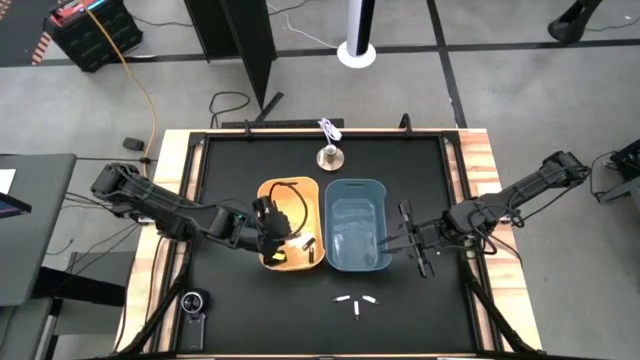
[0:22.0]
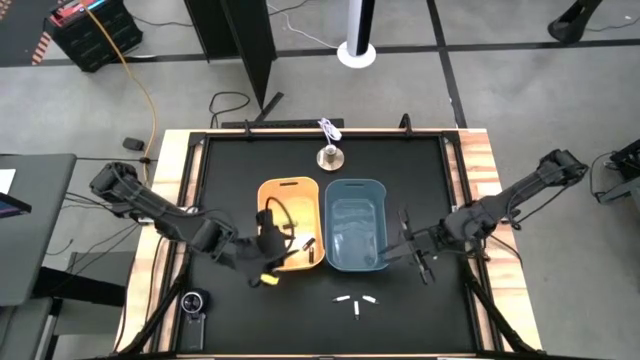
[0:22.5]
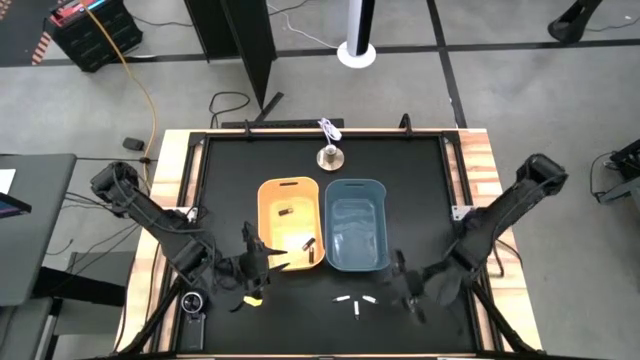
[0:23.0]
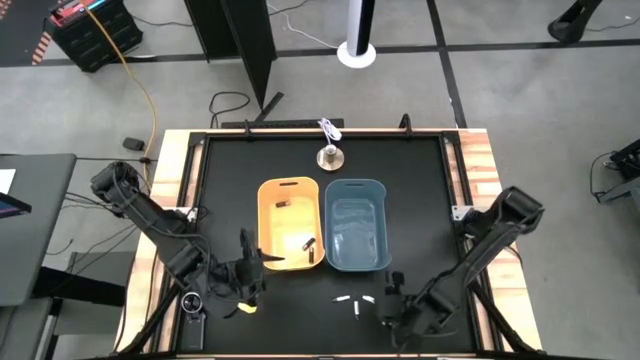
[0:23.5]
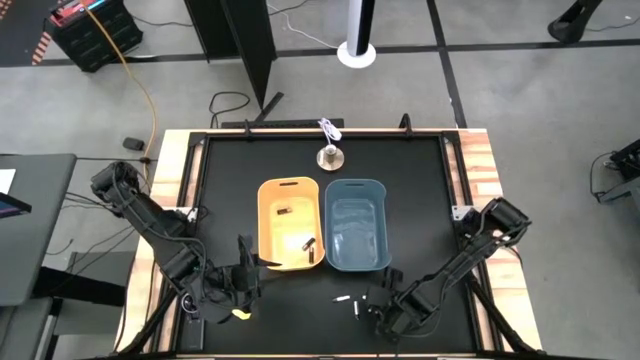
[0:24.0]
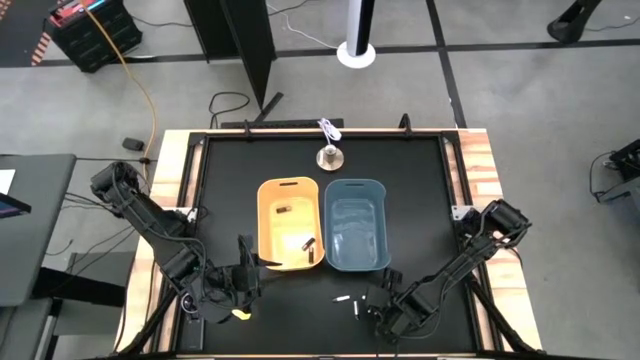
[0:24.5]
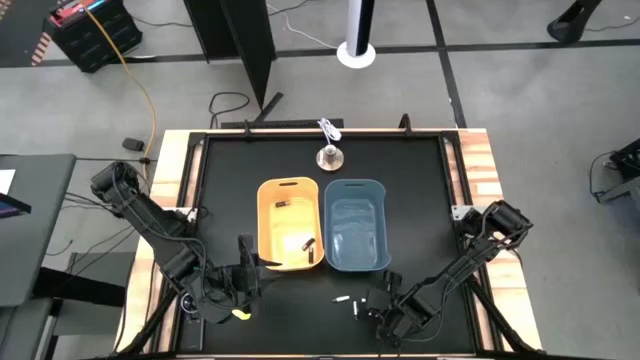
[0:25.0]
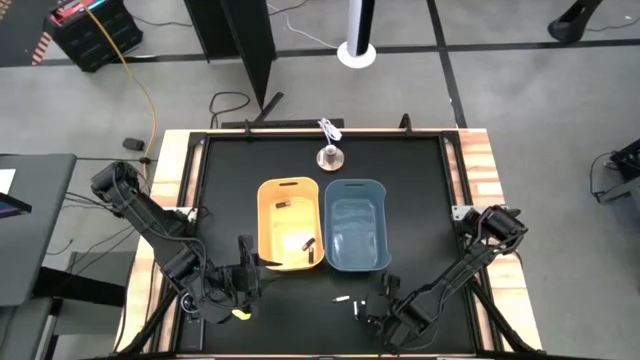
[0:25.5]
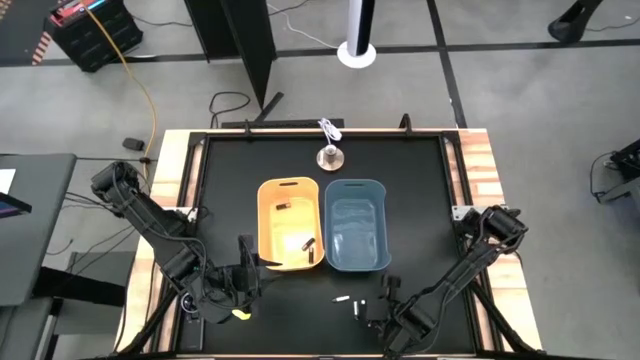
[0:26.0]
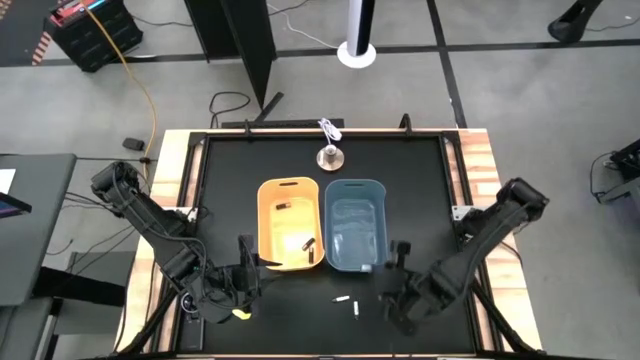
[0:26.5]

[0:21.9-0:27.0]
Task: Sort batteries
Put the right silver battery into the blue bin

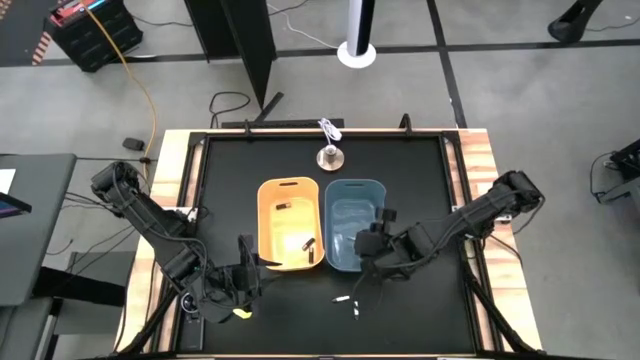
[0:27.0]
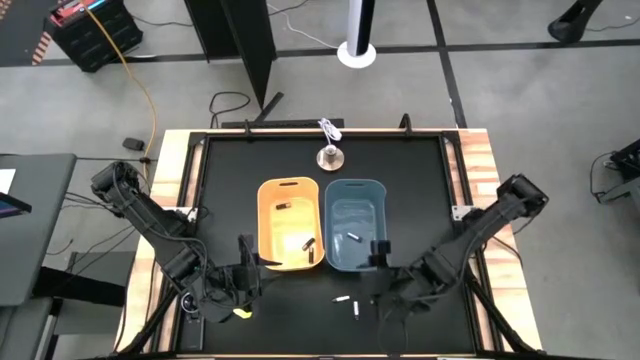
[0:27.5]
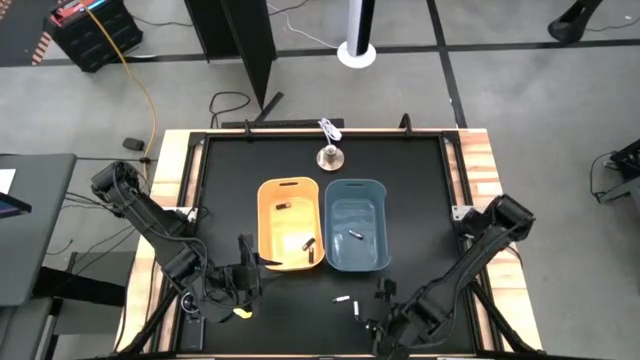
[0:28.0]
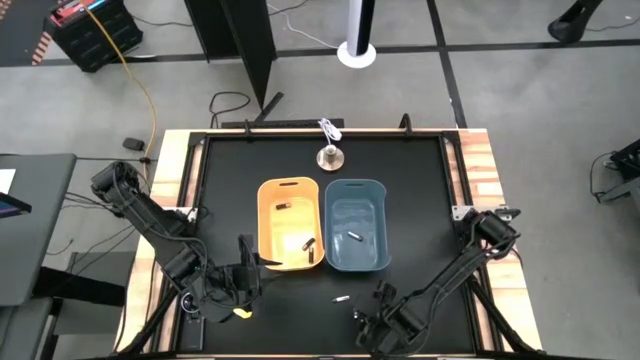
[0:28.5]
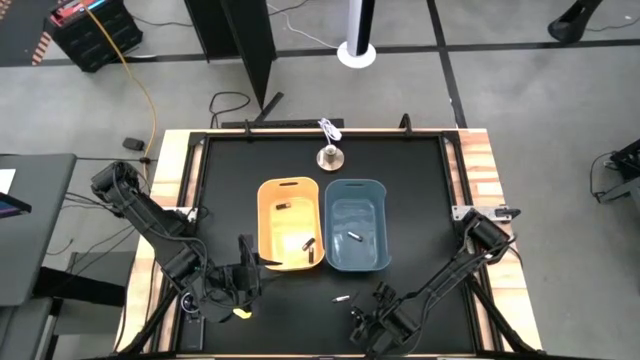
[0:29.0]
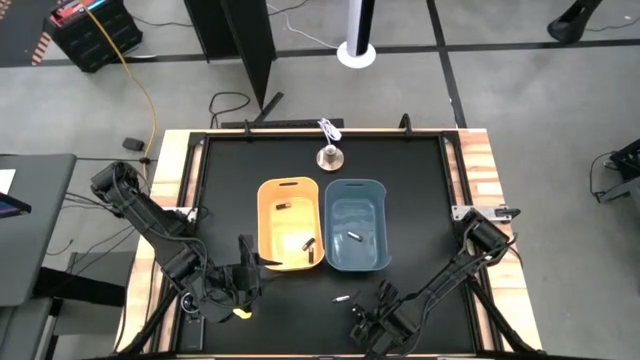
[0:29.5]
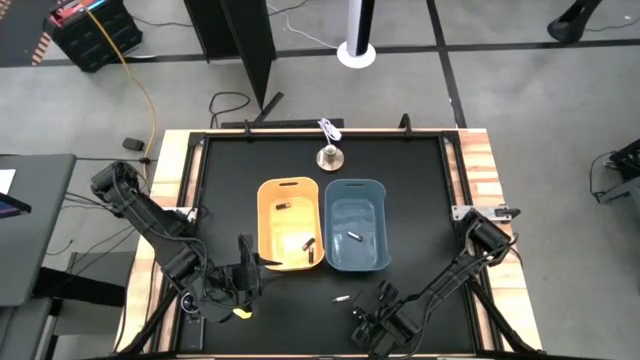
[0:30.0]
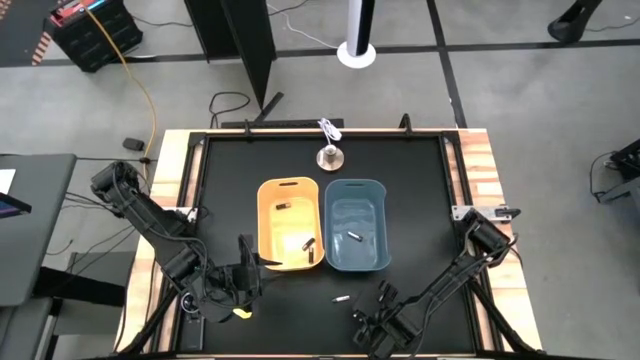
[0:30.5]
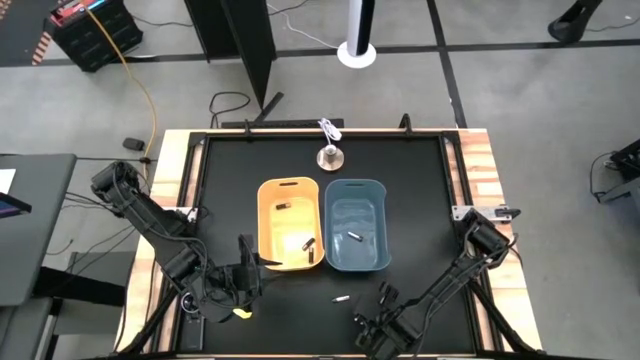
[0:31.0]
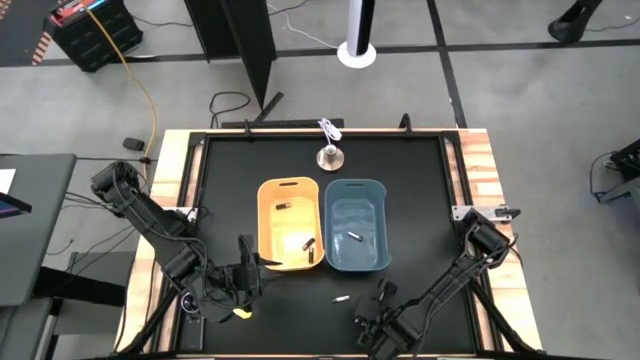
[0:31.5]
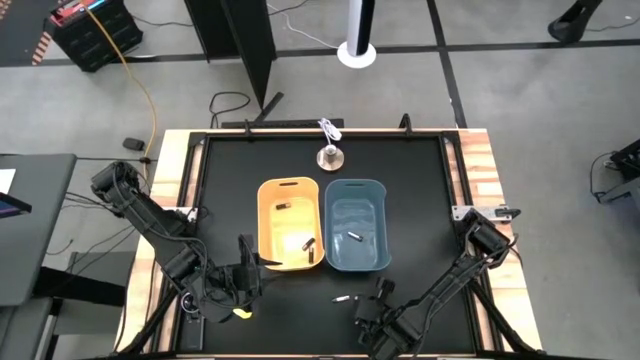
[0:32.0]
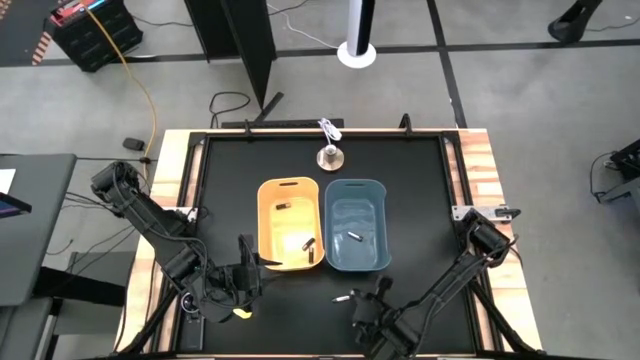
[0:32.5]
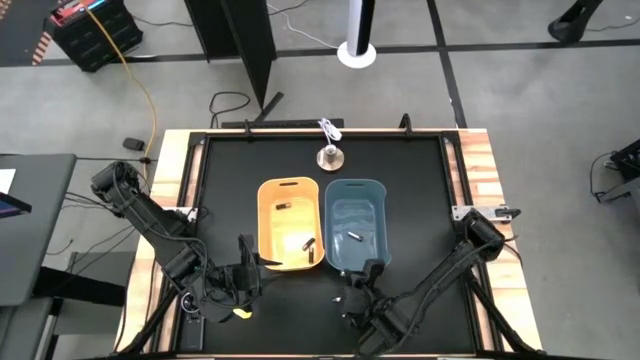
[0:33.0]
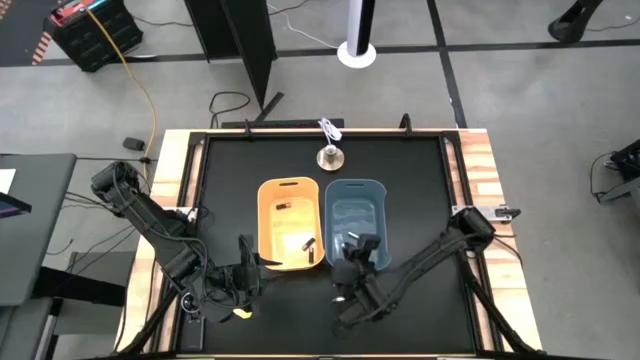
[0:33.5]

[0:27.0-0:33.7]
Put the bottom silver battery into the blue bin

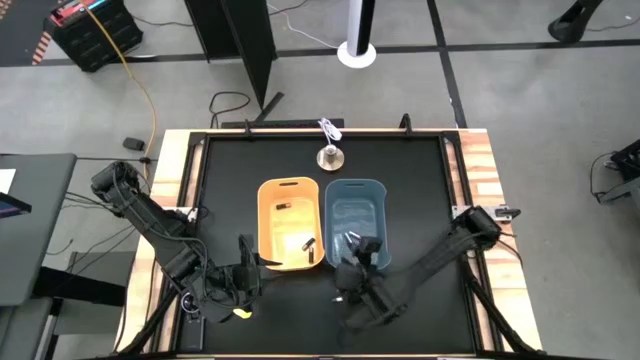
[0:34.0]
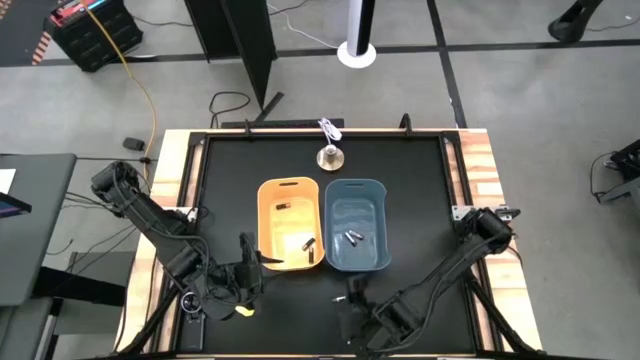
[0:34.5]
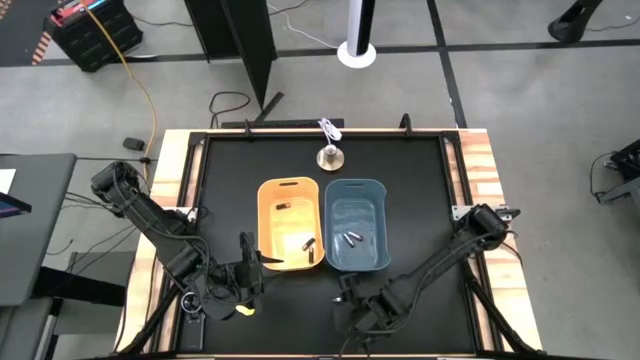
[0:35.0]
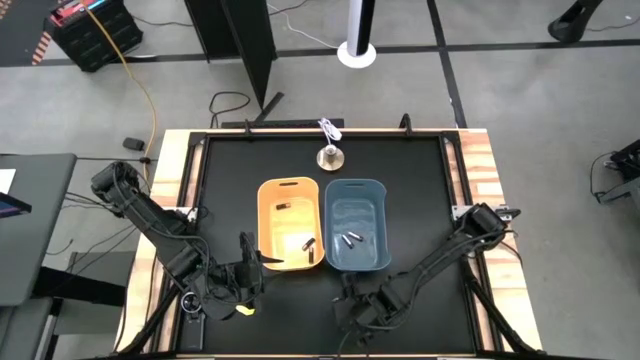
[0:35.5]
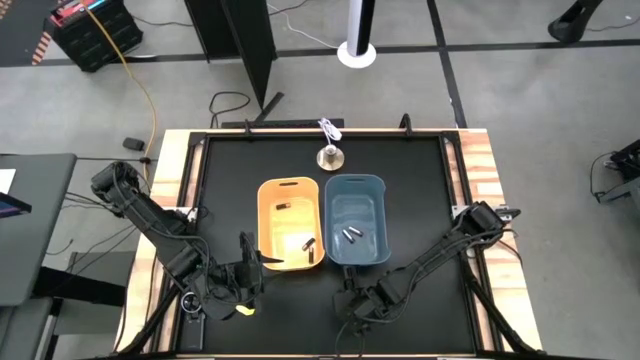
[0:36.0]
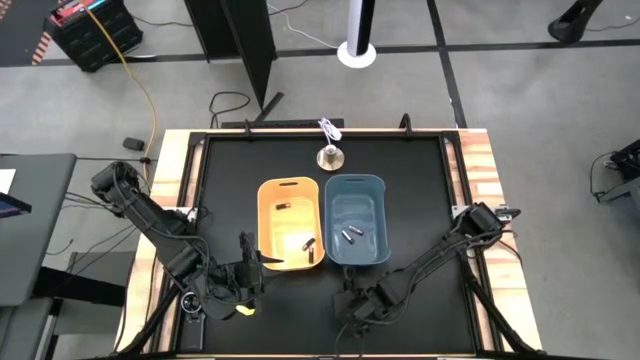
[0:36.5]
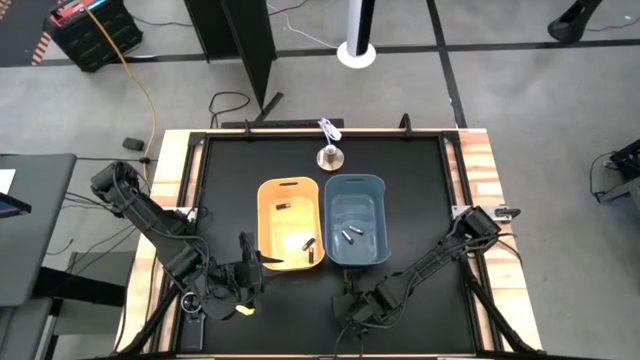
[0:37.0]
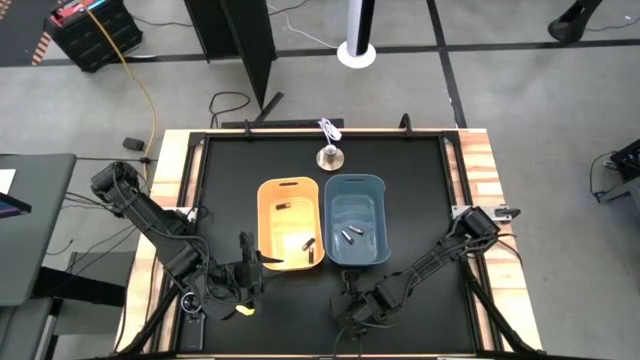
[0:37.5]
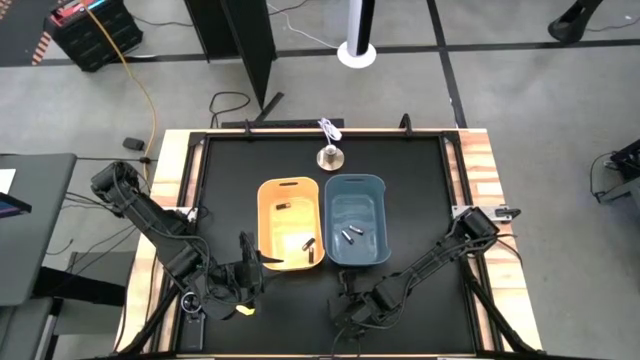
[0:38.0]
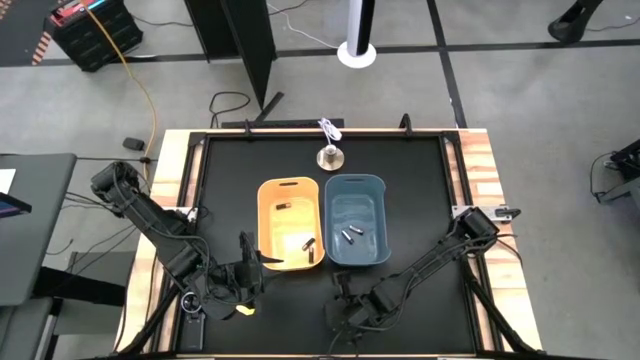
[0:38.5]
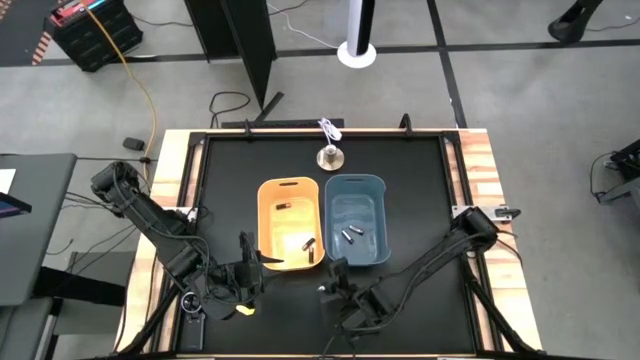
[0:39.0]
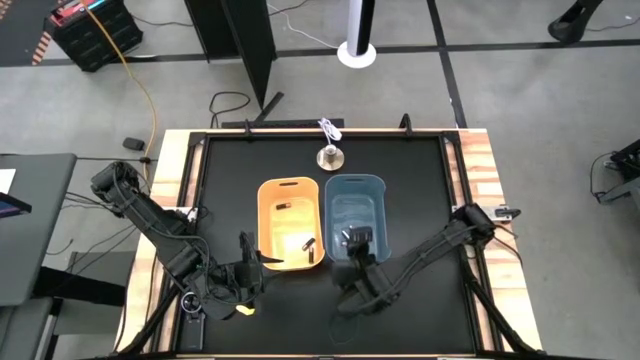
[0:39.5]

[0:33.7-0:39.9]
Put the silver battery into the blue bin

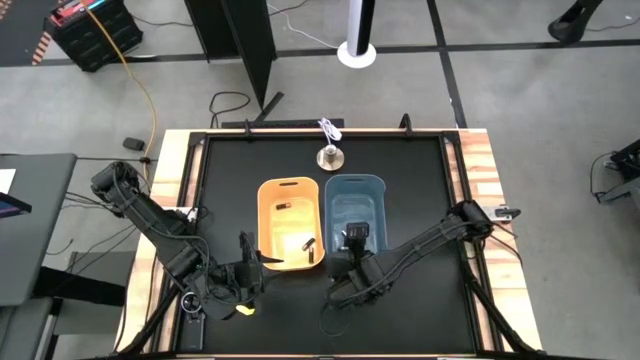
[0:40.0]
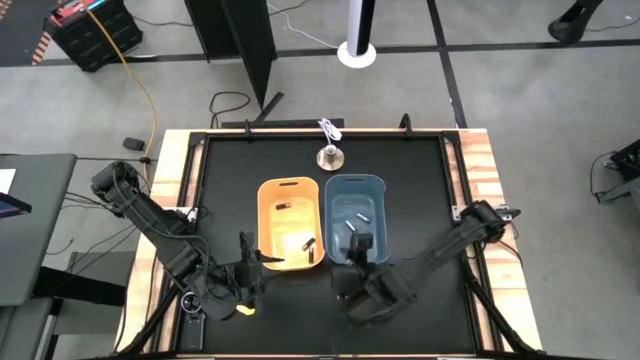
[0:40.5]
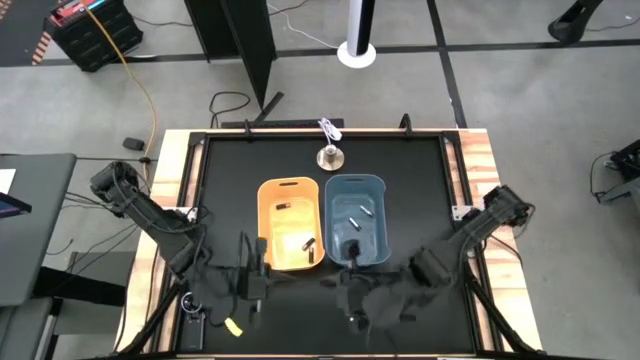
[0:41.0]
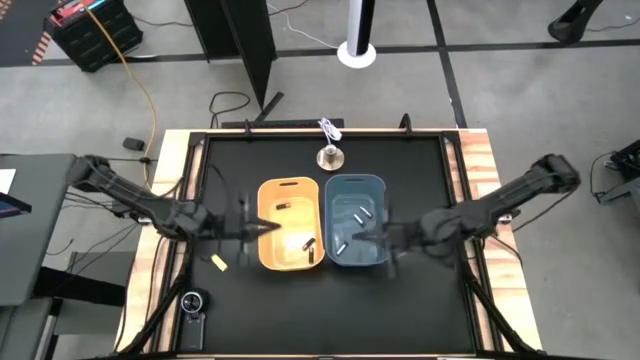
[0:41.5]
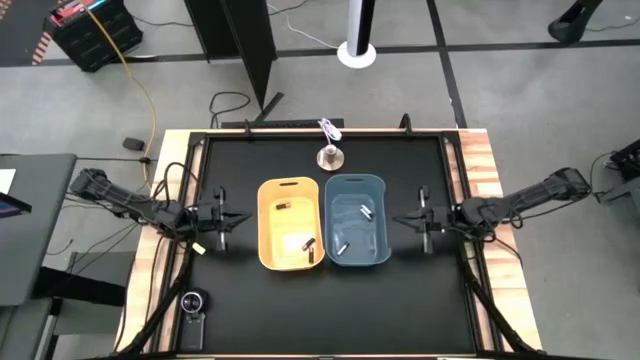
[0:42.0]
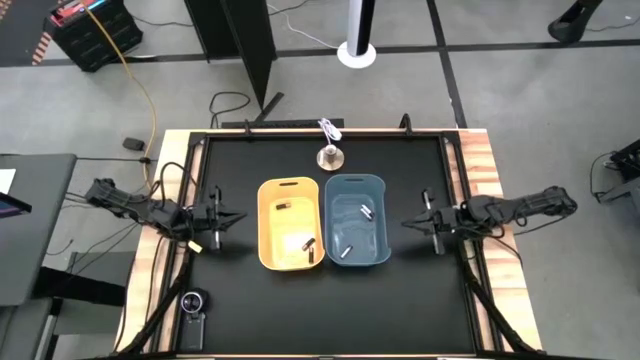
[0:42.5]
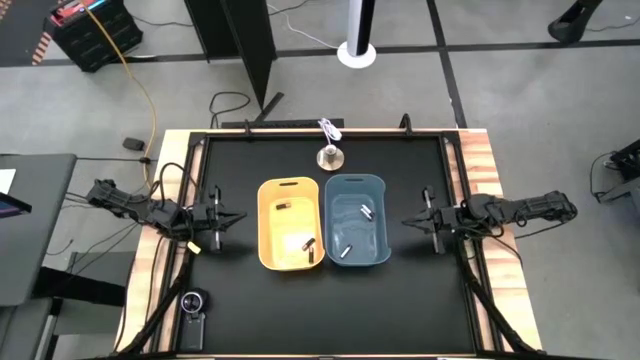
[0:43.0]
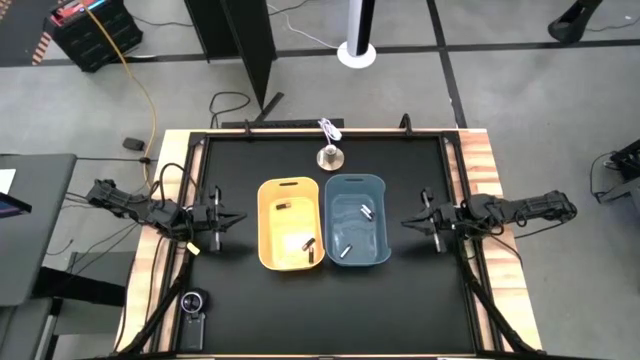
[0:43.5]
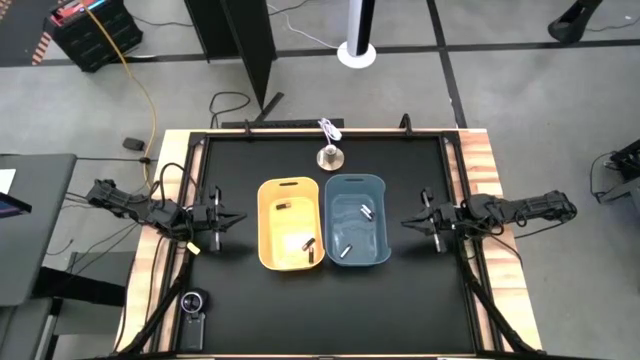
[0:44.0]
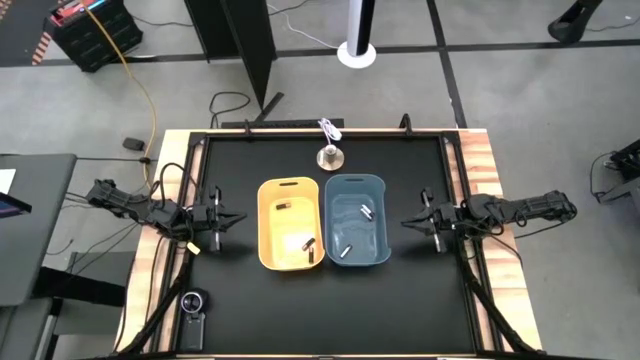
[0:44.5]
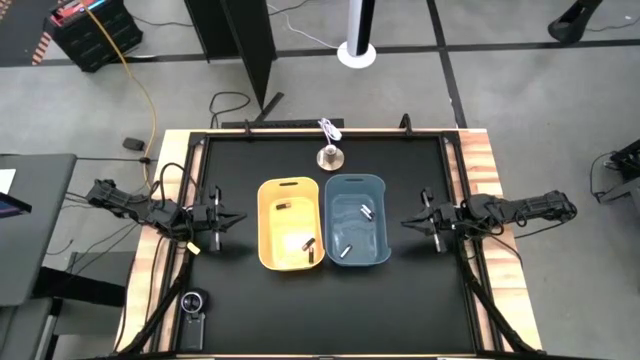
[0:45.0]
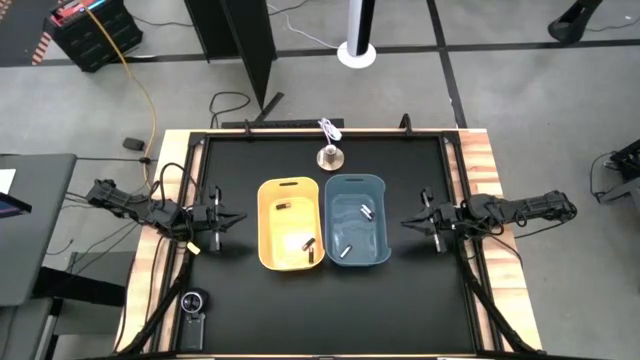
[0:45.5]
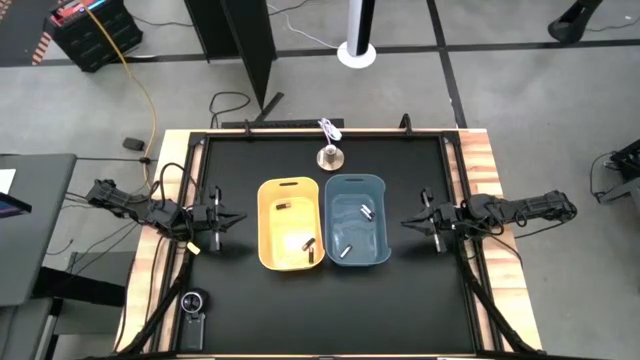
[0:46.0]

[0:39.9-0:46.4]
Return to Home Position
